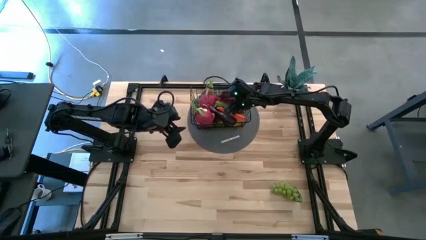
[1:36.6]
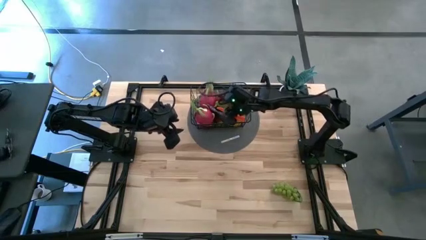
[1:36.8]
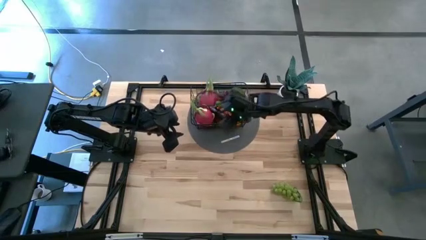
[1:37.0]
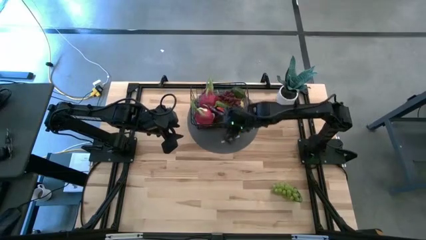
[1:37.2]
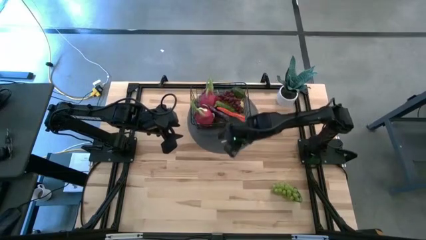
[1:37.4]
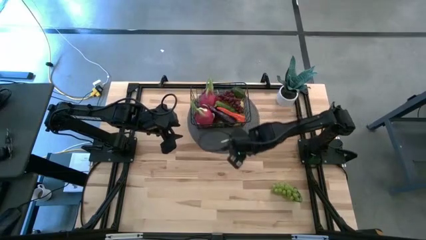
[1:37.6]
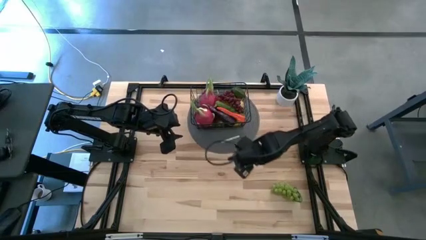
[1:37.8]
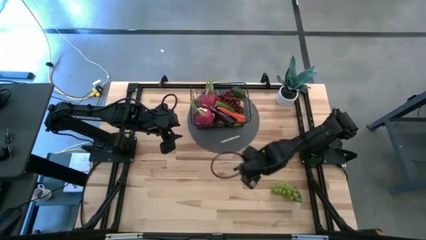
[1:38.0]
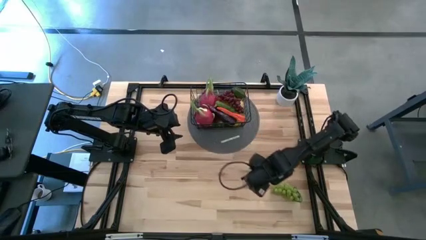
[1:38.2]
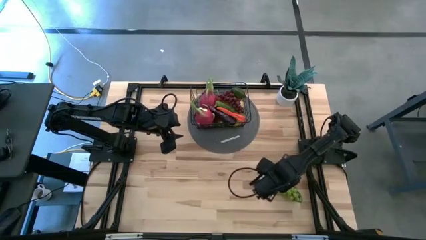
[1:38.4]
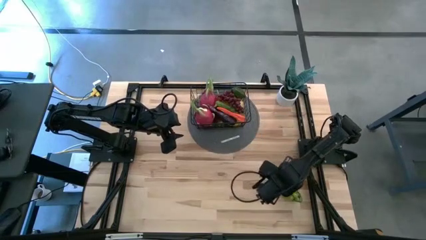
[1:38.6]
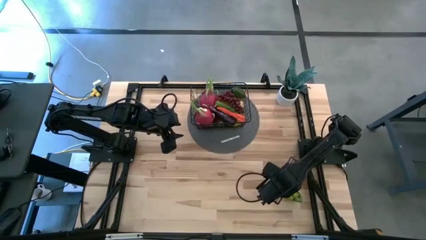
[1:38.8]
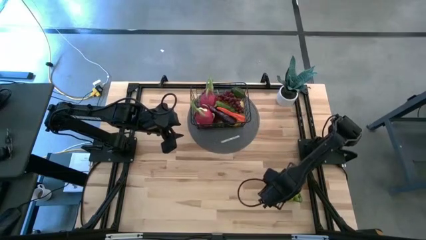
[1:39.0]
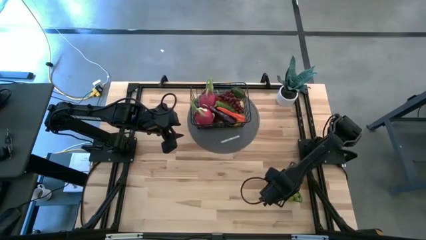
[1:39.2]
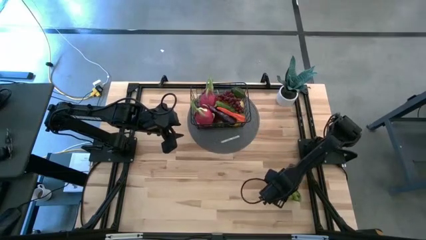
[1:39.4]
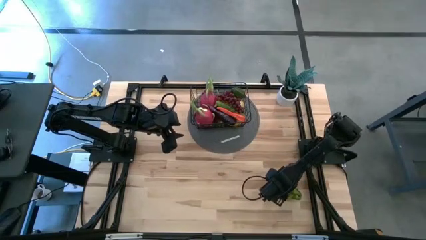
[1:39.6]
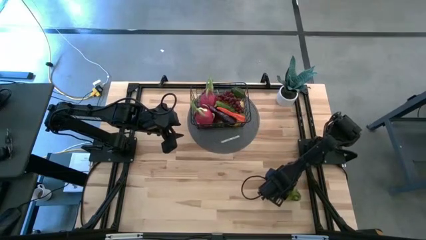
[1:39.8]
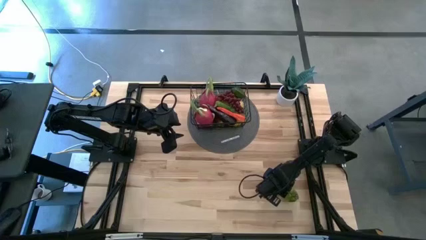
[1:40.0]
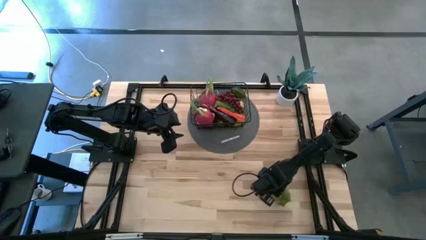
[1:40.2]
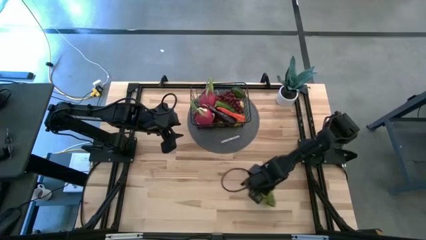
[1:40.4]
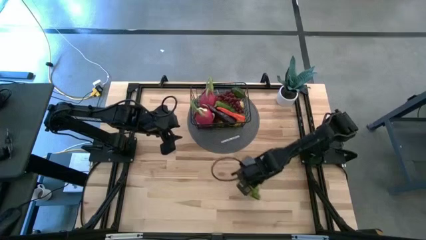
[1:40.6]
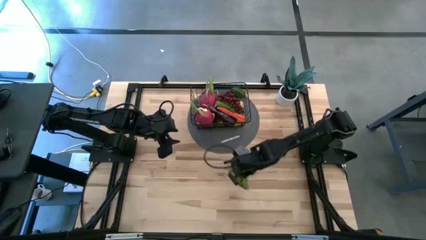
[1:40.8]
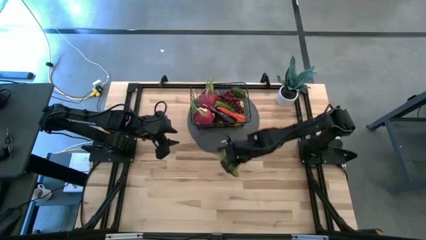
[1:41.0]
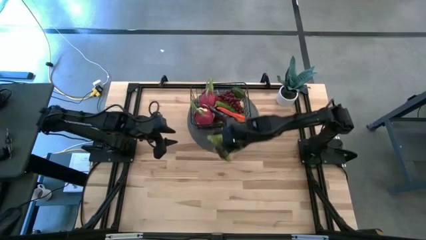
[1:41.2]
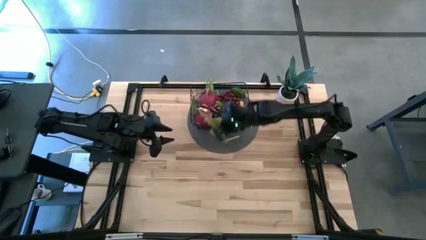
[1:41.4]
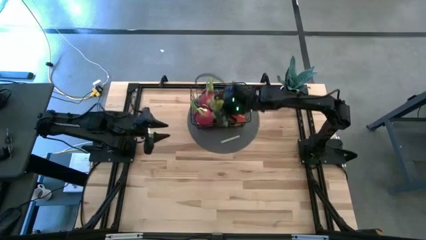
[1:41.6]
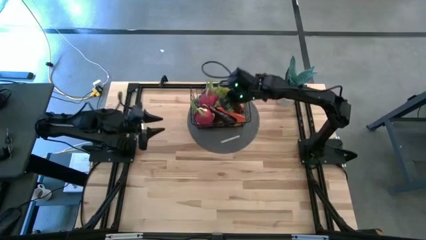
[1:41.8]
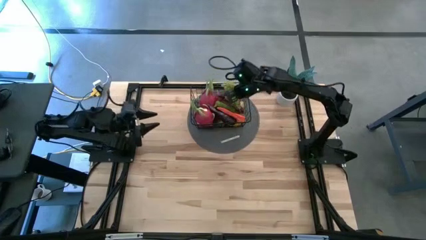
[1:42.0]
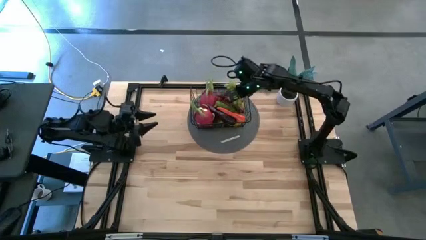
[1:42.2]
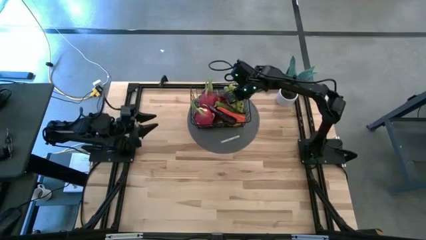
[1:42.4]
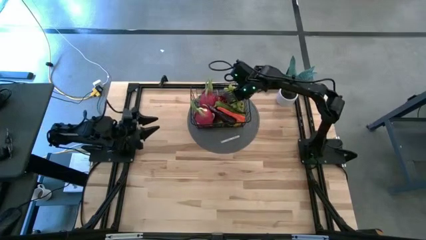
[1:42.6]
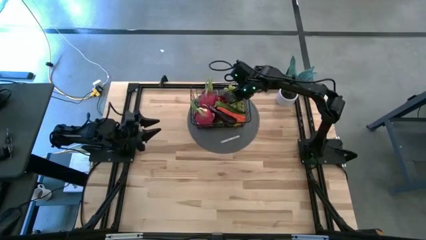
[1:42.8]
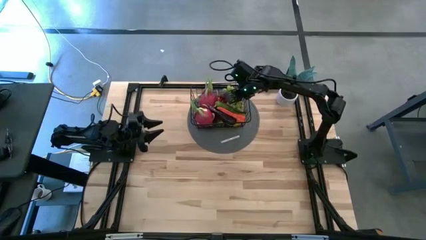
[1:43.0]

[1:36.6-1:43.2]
Task: Build produce basket
Put the green grapes into the black wire basket

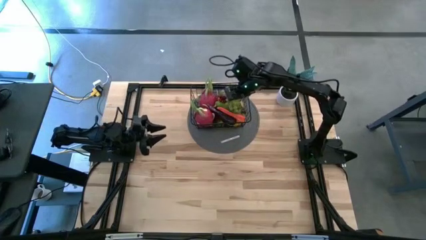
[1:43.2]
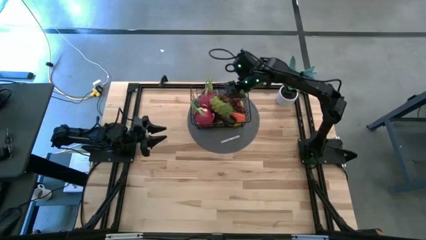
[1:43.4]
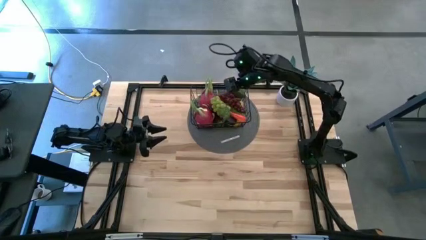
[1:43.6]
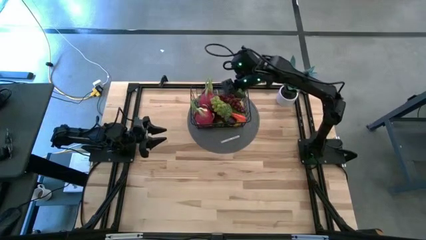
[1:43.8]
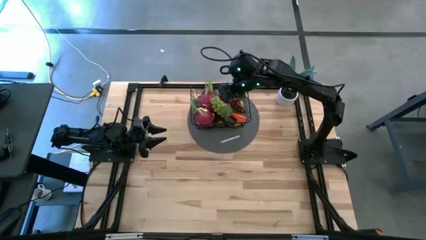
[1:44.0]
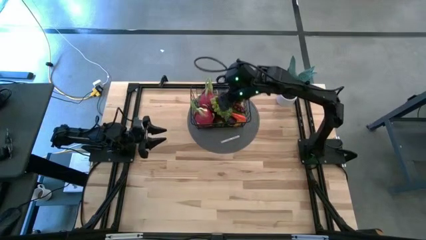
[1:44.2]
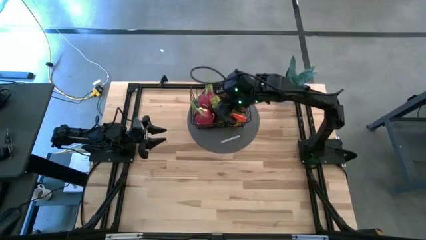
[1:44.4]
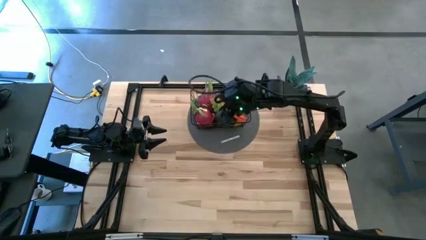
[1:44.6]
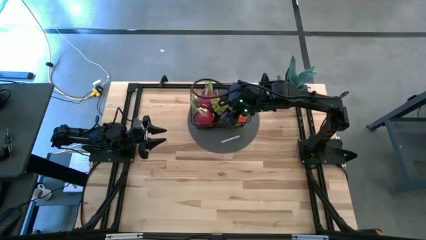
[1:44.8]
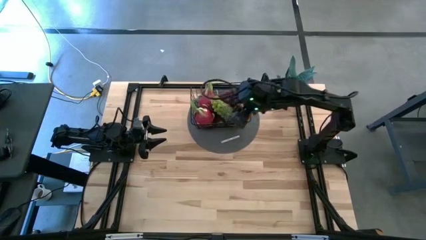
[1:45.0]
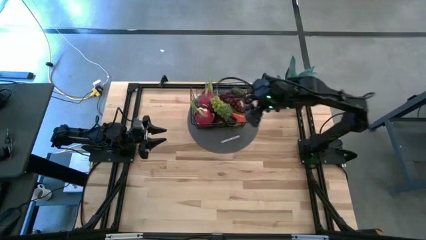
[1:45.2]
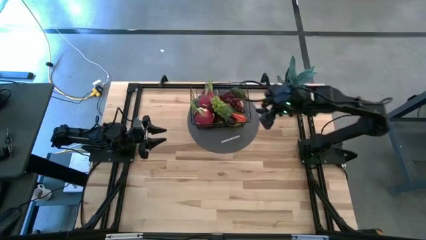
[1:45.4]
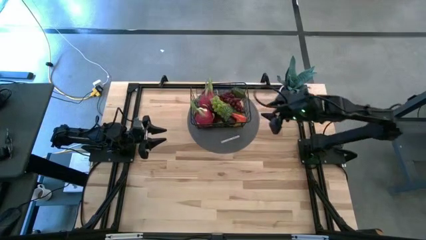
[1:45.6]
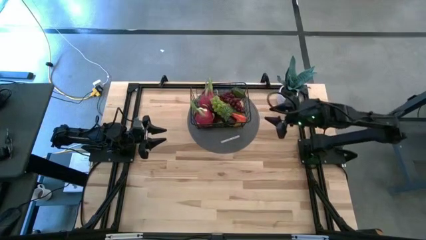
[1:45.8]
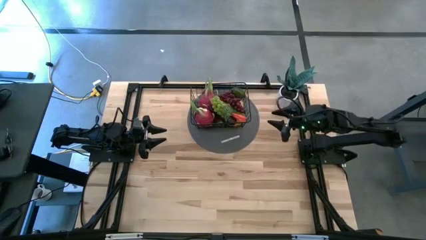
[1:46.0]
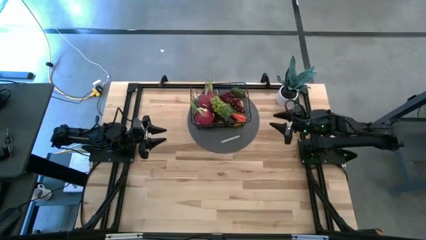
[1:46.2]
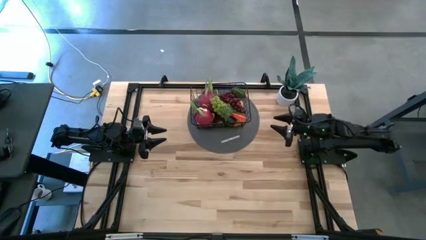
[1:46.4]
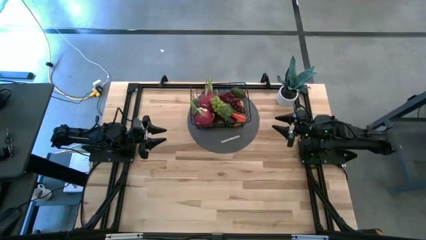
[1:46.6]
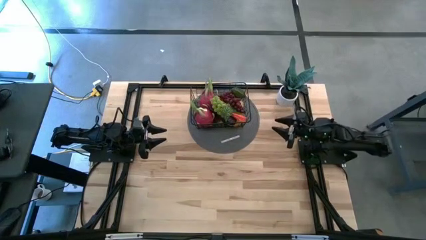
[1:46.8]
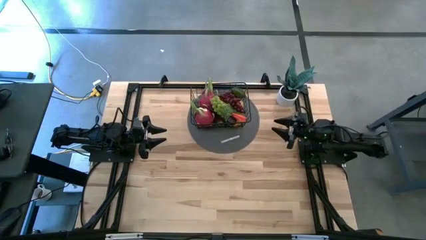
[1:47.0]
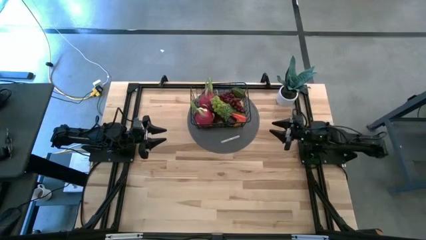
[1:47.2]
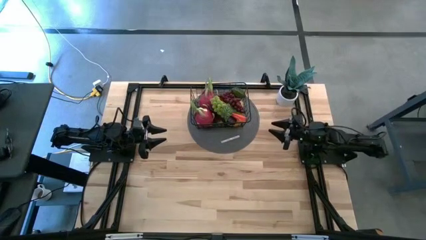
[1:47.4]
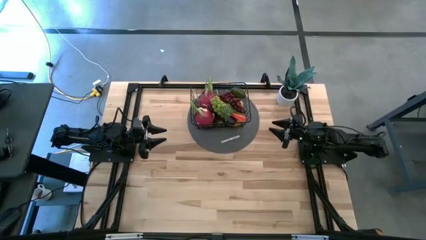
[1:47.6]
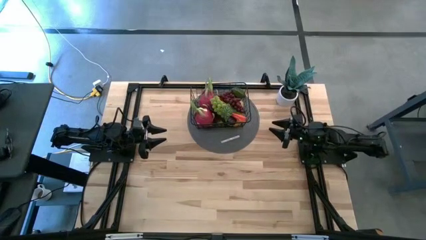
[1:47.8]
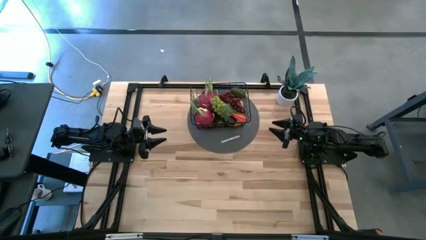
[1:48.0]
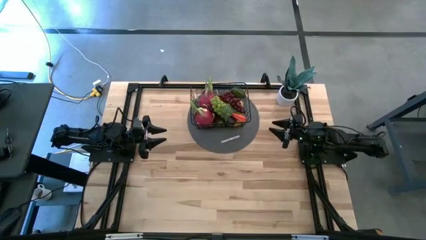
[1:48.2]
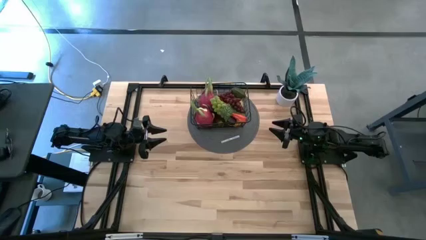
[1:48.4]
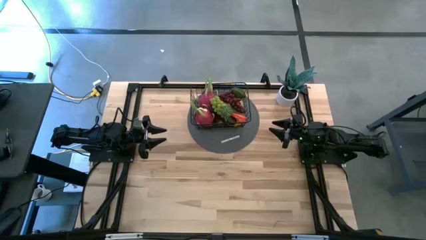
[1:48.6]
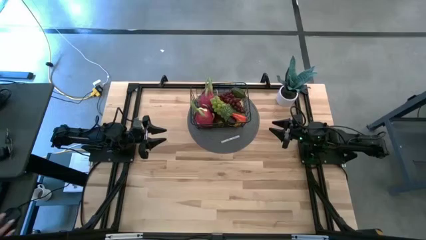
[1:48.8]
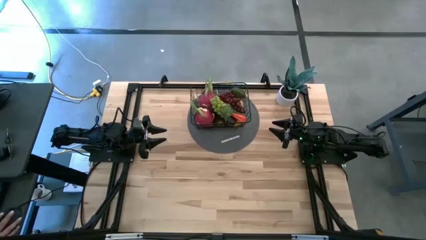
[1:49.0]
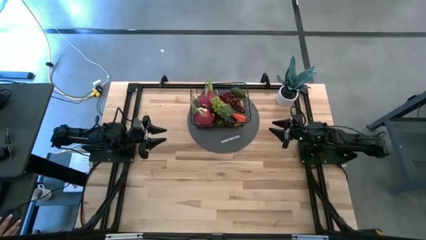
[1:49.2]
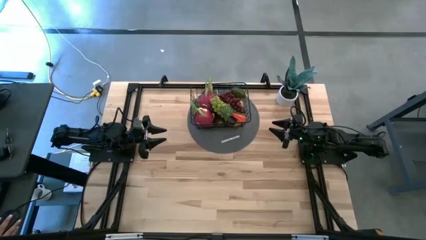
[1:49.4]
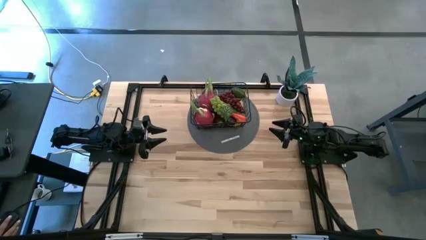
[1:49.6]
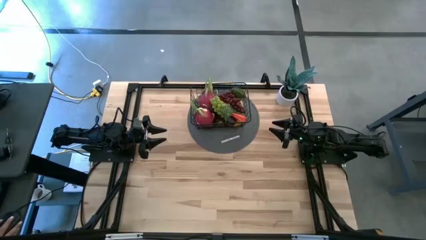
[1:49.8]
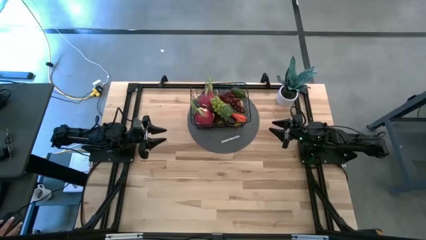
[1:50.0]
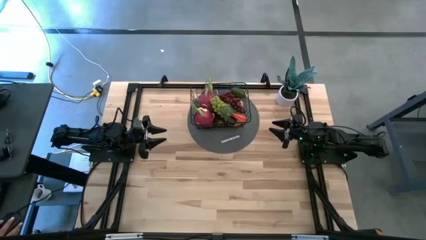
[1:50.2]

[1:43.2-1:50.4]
Return to Home Position
